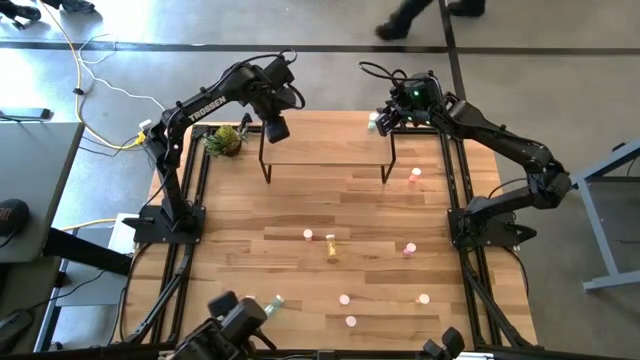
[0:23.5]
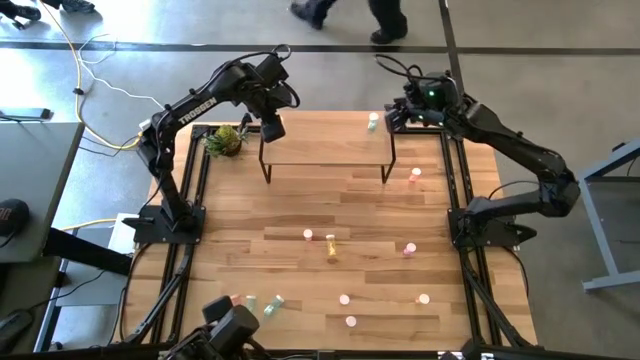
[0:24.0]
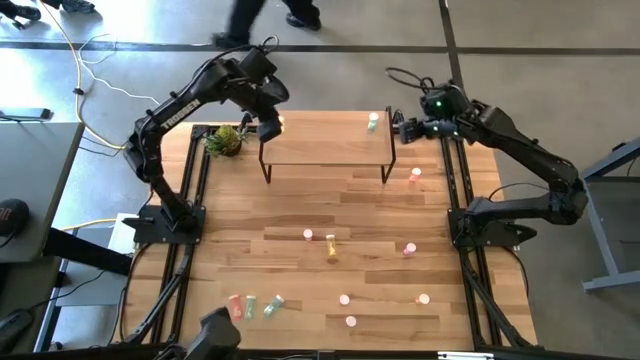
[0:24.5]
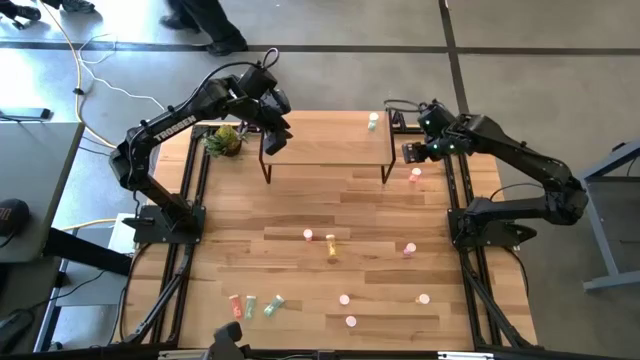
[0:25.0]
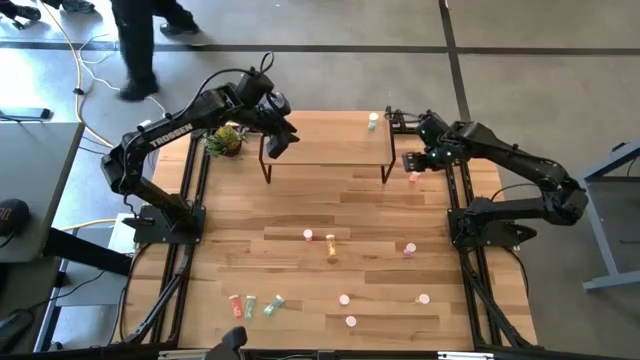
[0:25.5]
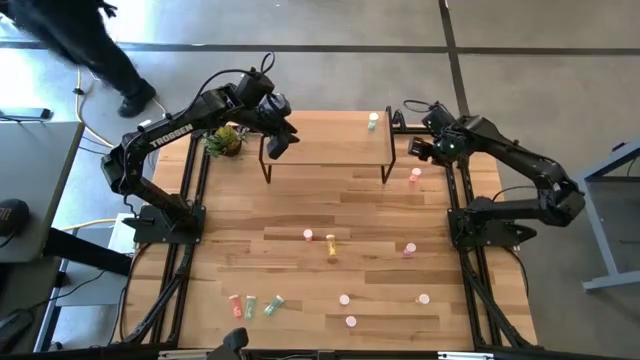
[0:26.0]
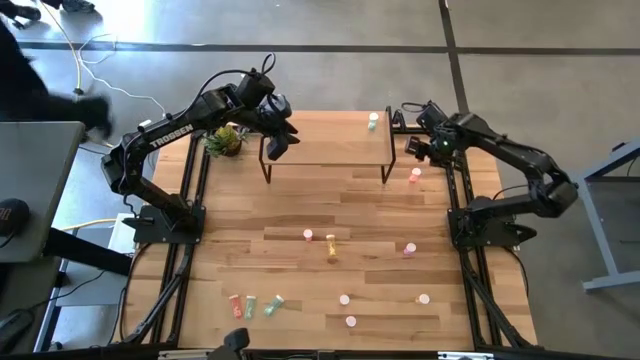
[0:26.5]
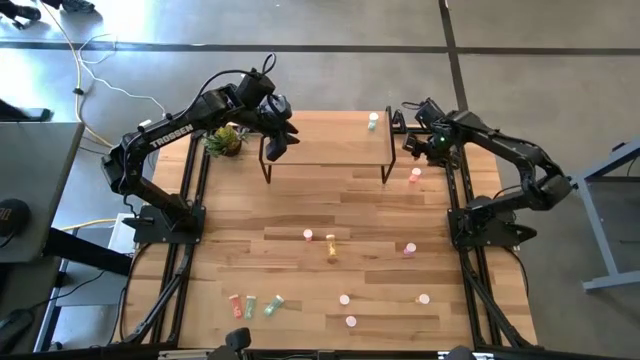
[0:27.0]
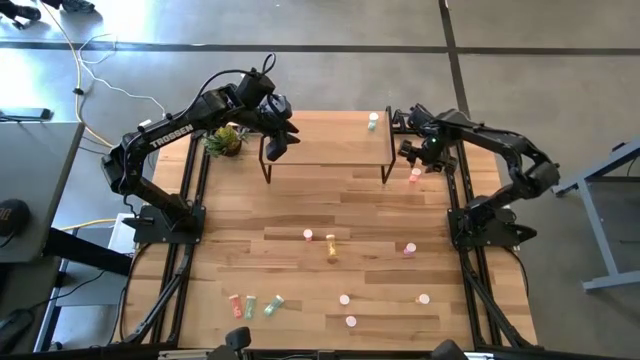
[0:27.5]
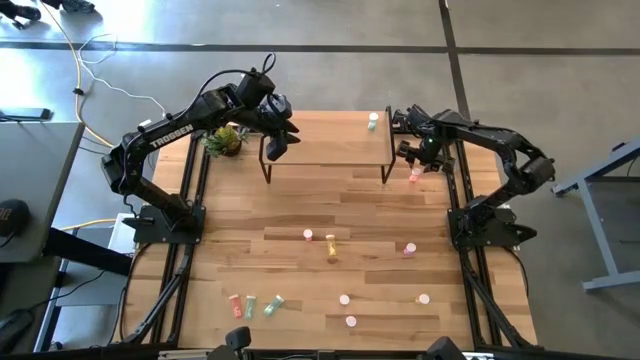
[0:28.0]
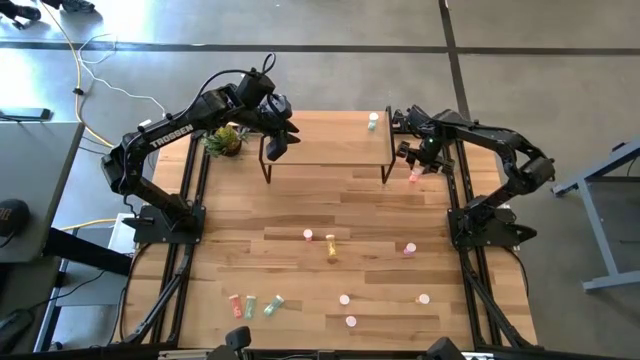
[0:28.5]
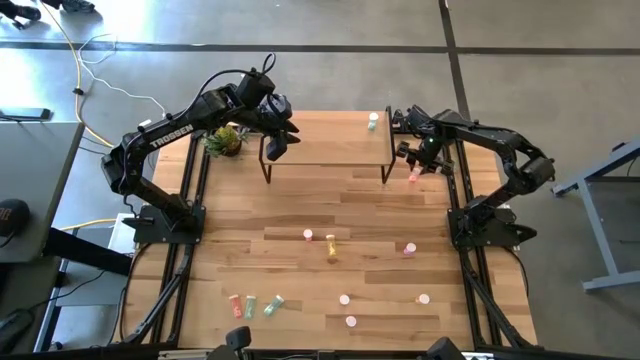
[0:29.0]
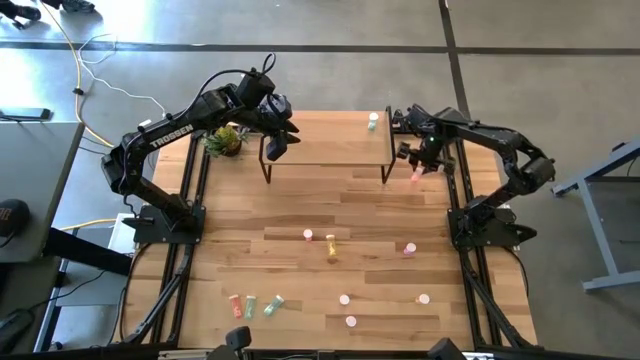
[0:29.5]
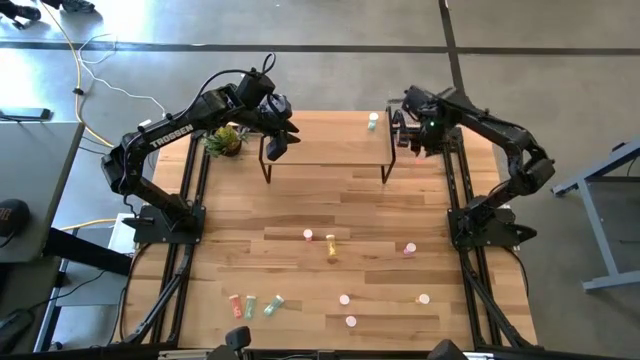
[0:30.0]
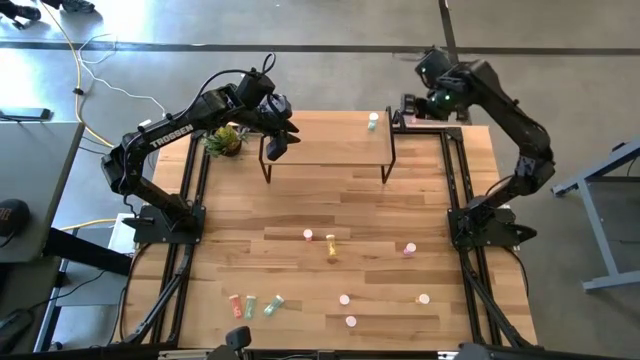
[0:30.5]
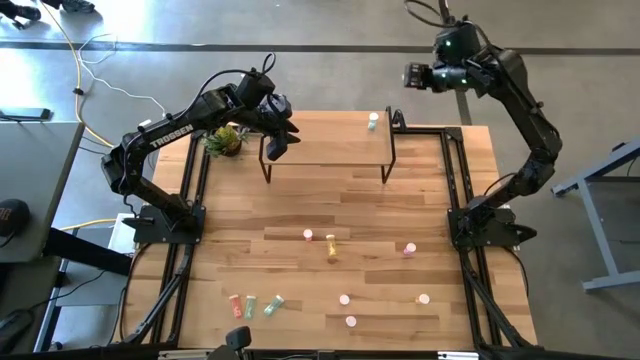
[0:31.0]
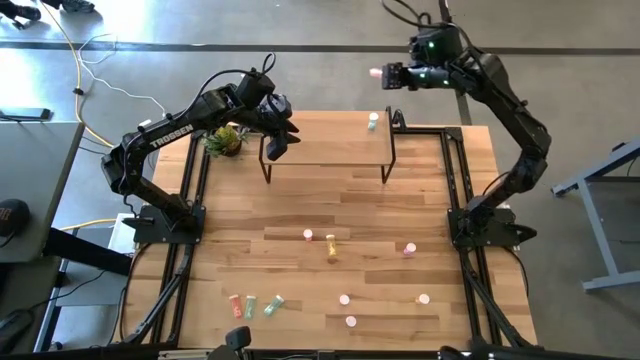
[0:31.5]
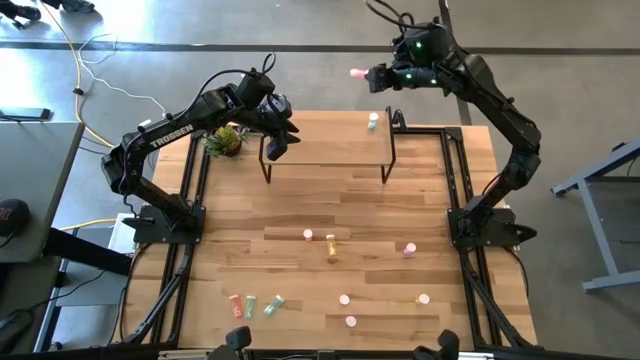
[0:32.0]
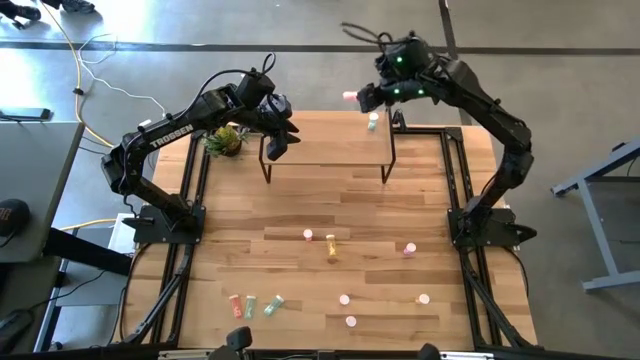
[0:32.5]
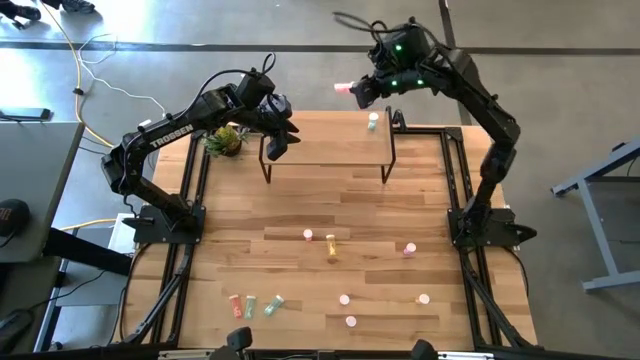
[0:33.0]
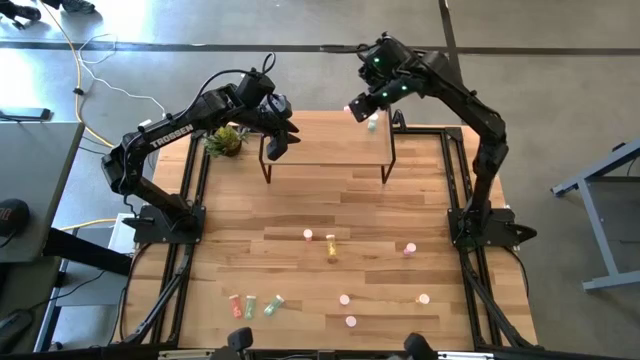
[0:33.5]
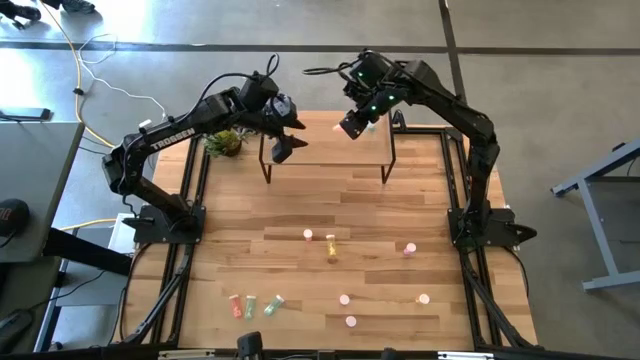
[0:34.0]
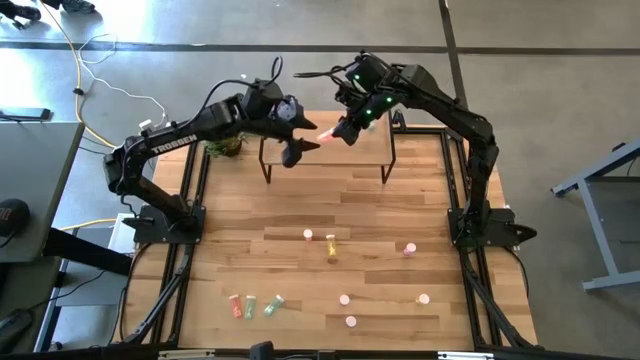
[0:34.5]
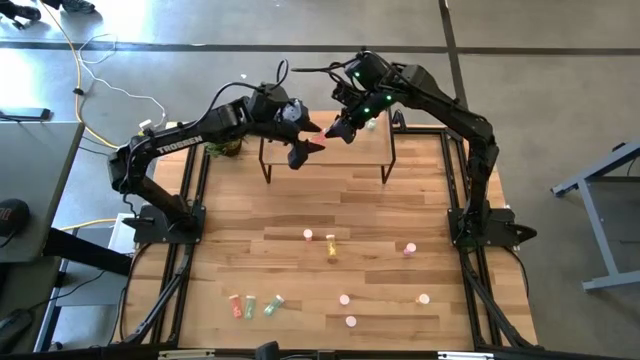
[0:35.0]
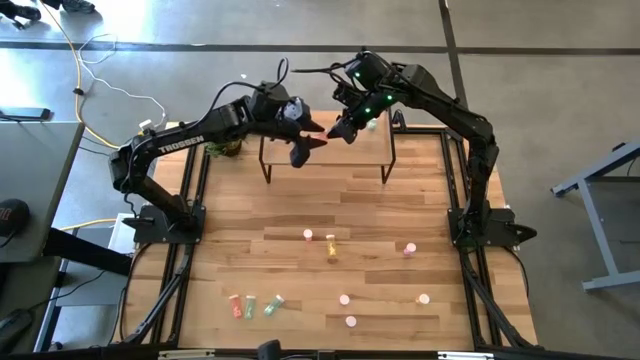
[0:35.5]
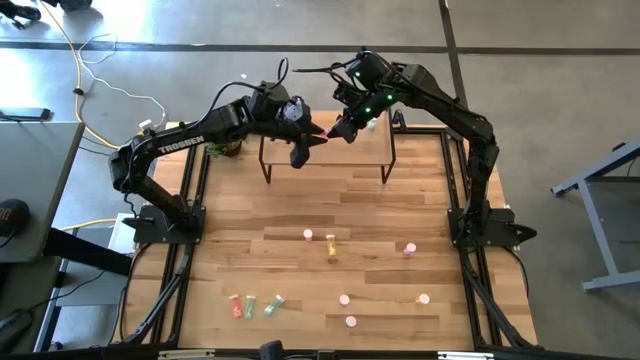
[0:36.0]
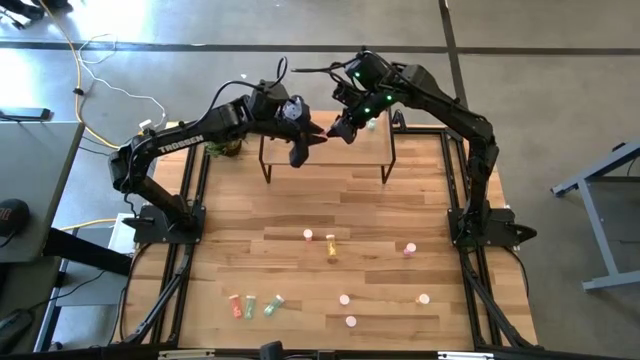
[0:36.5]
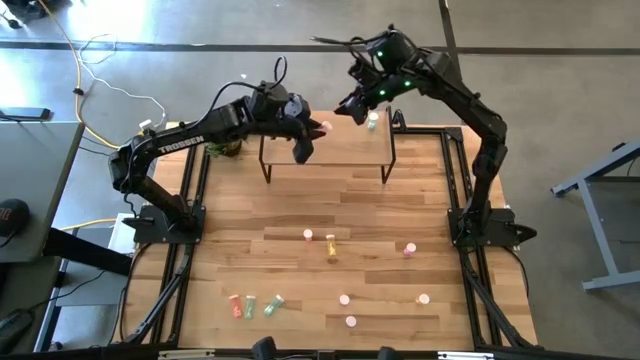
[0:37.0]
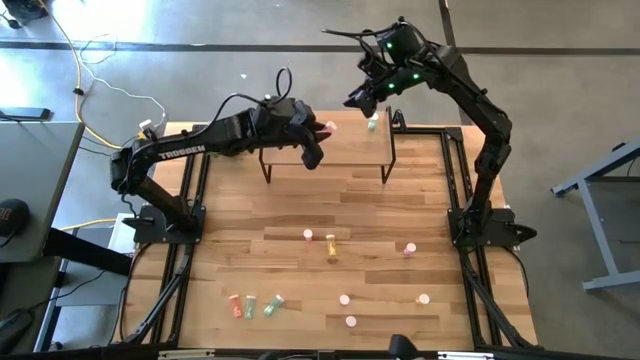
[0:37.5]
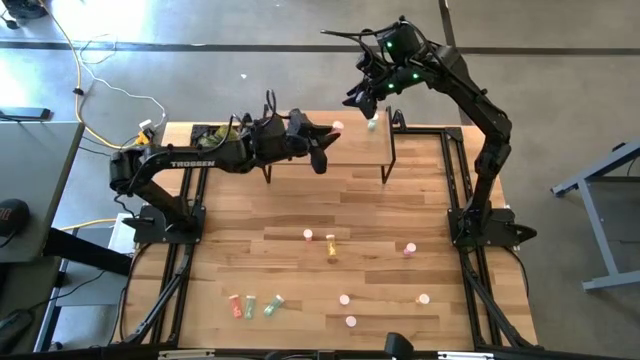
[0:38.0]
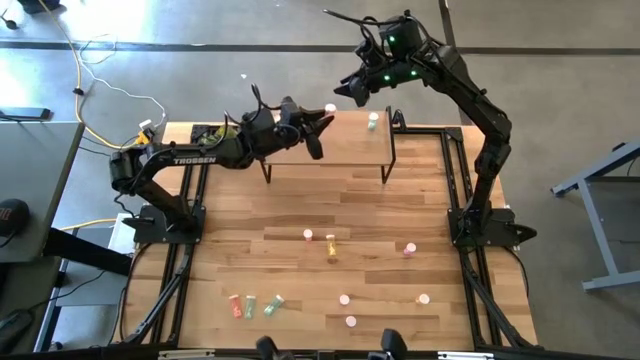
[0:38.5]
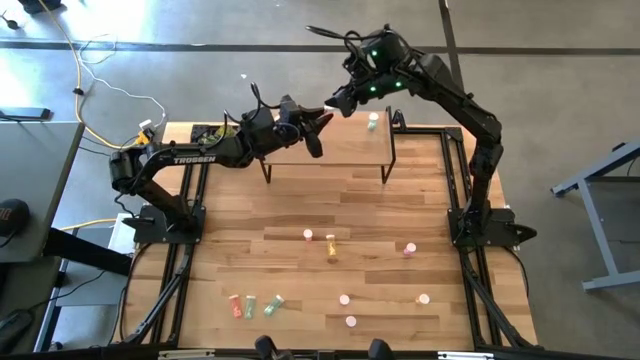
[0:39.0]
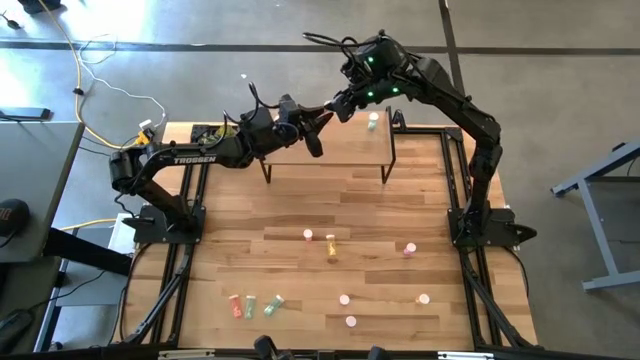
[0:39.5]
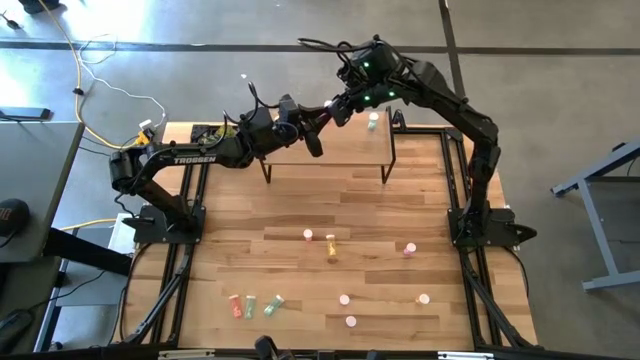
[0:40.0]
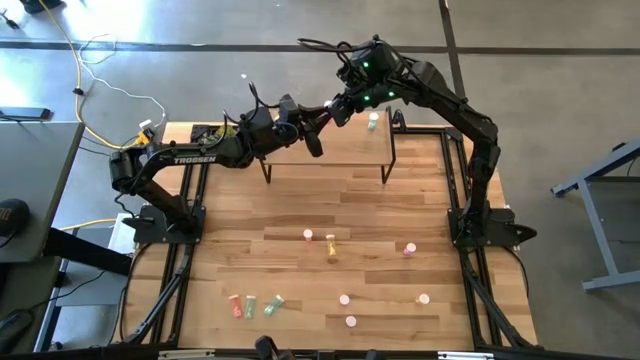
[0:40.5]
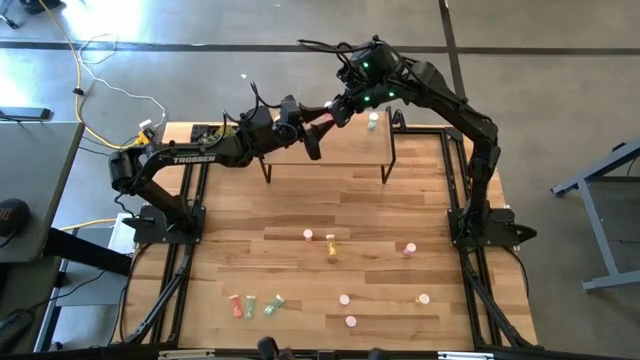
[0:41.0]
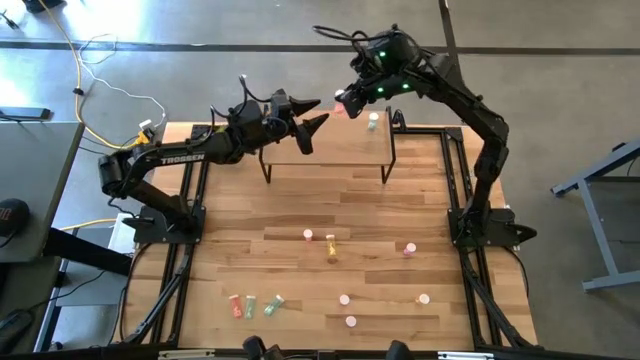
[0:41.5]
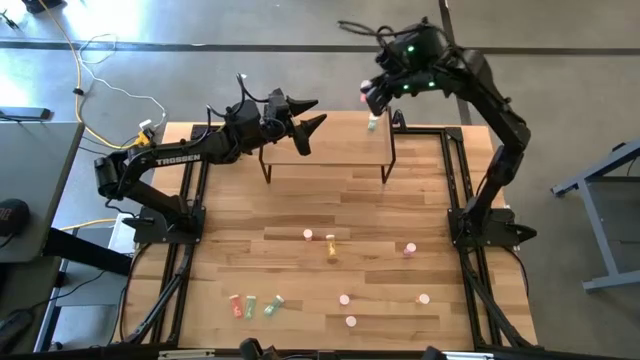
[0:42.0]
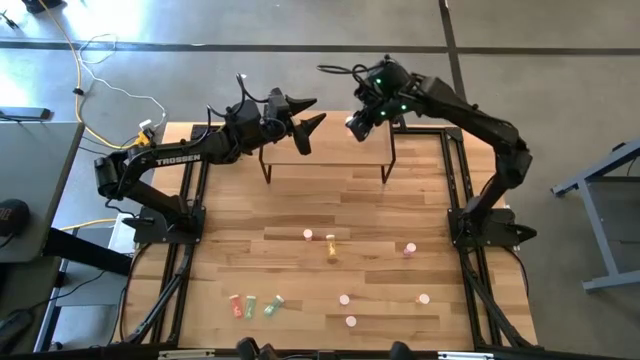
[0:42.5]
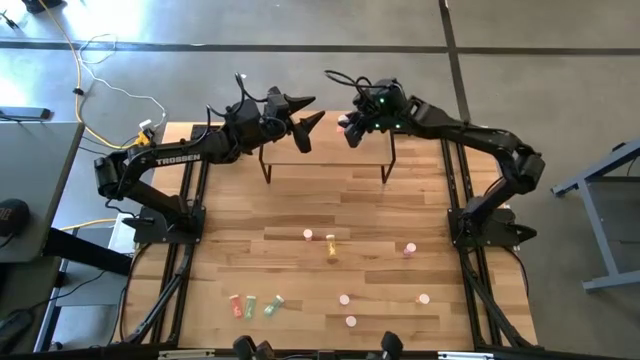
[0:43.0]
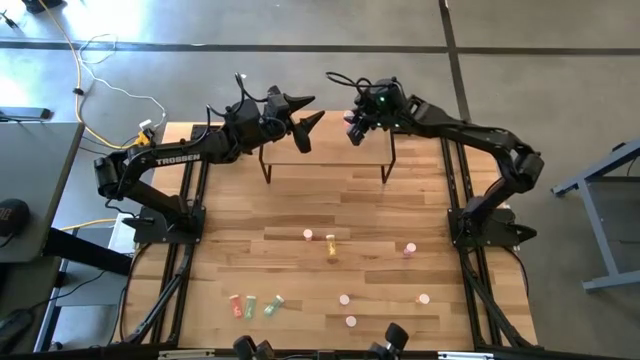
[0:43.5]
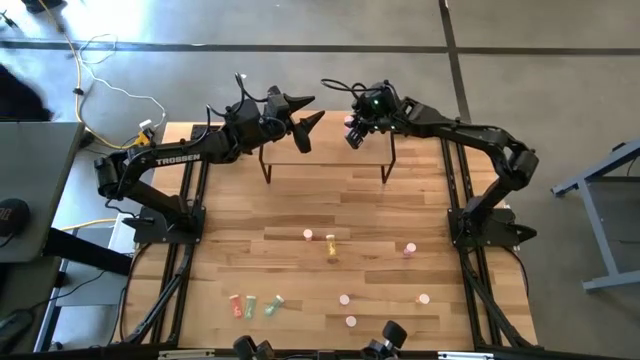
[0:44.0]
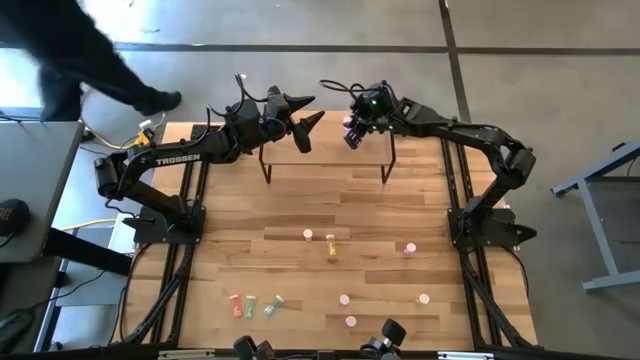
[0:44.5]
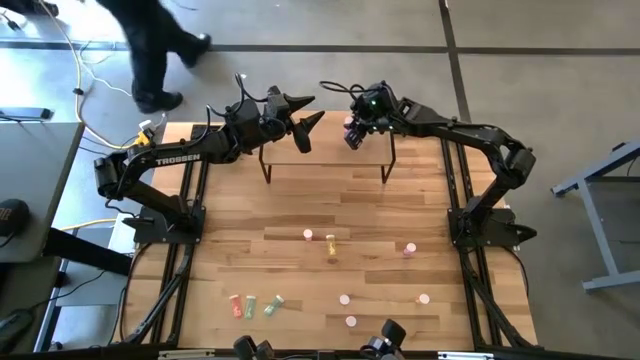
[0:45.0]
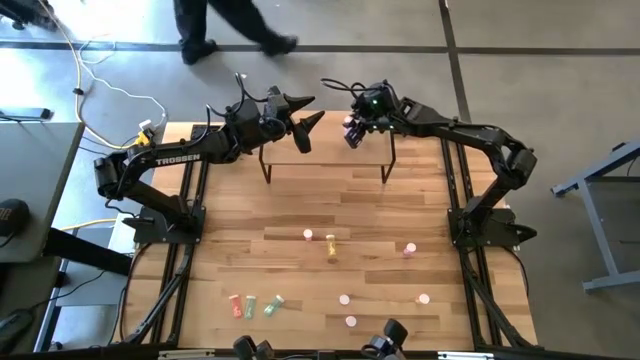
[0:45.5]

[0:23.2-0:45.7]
Task: Pick and place medicine bottles onto shelf by color
Put the top red pill bottle on the shelf
